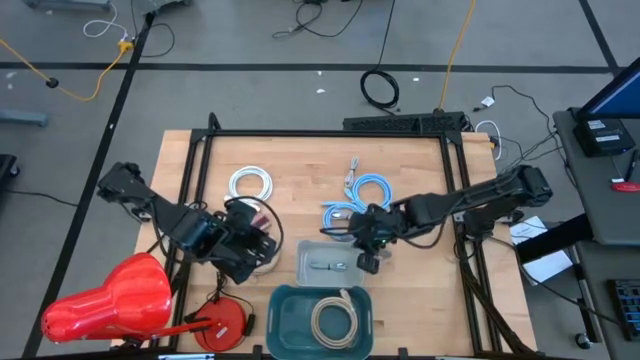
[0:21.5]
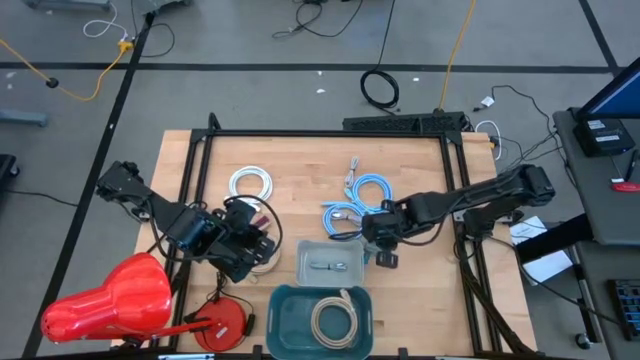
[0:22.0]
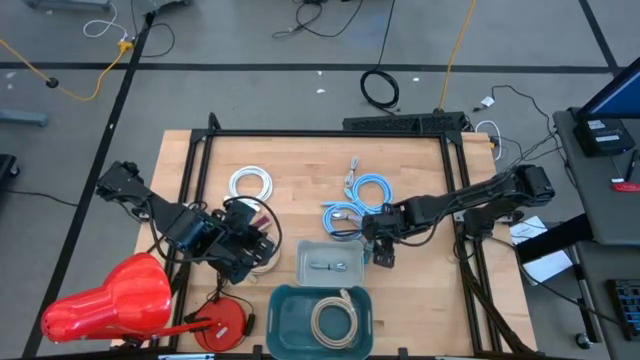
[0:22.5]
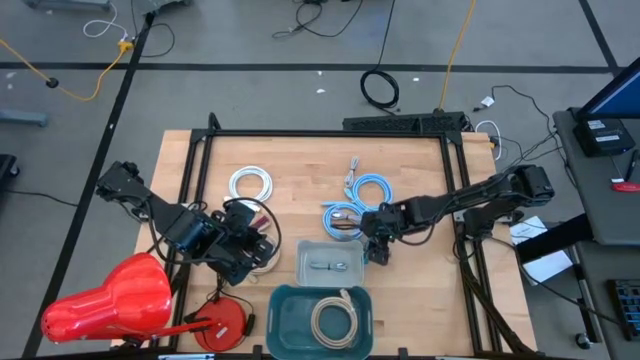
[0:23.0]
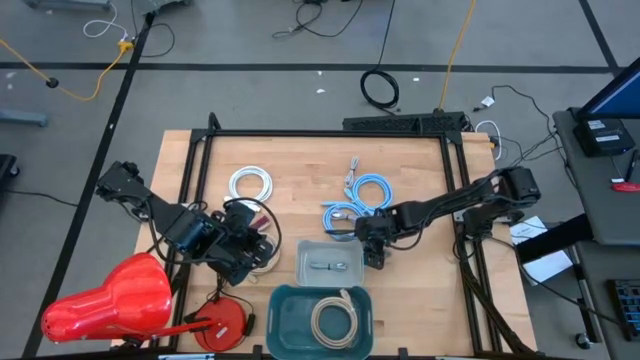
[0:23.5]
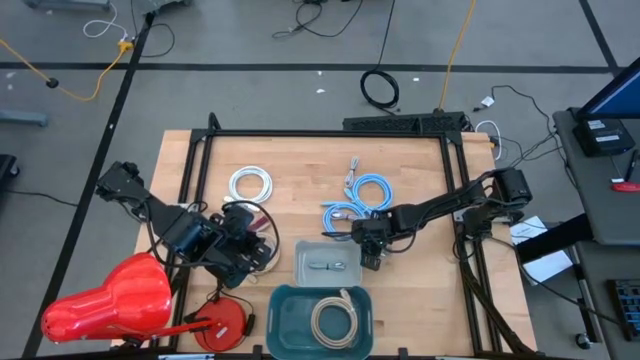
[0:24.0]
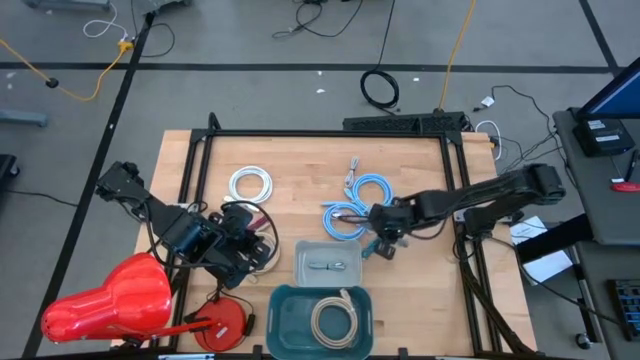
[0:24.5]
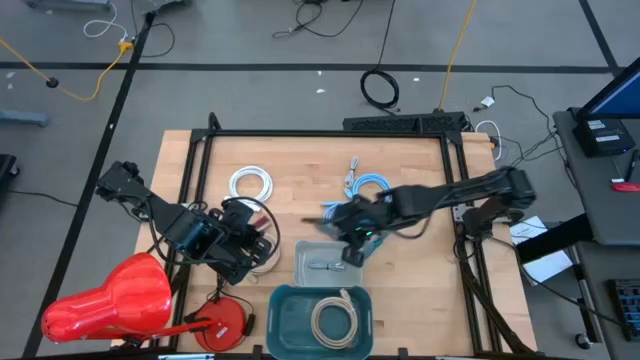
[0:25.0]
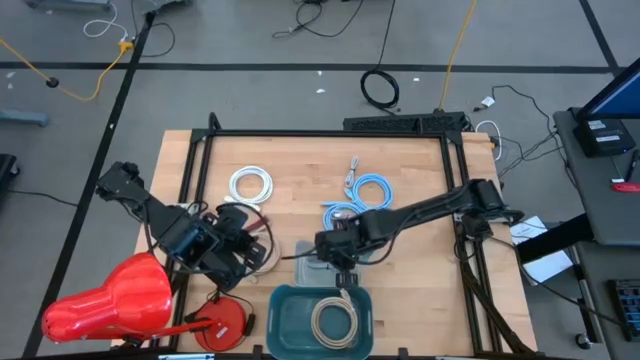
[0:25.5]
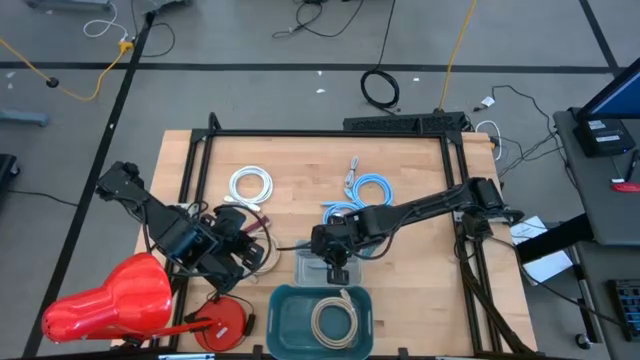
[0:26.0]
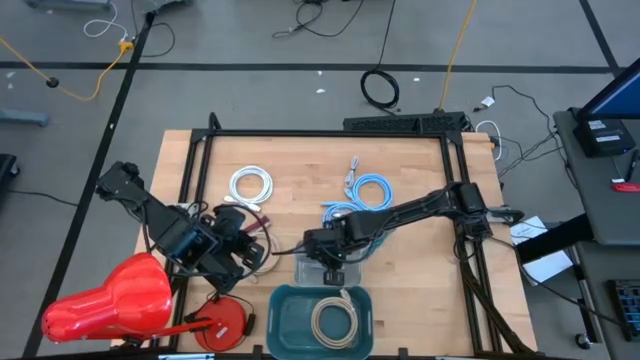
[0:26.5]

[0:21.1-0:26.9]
Task: Pick & Place USB Port
Put the black and white charger cable into the gray bin

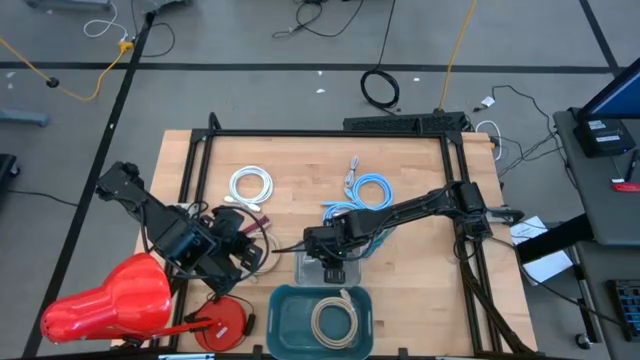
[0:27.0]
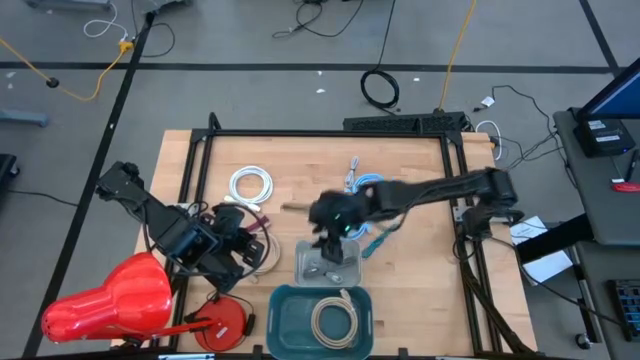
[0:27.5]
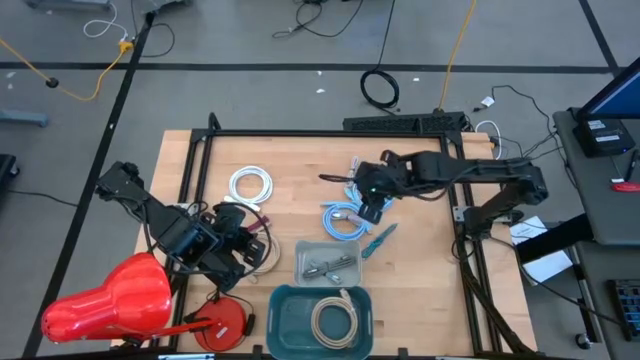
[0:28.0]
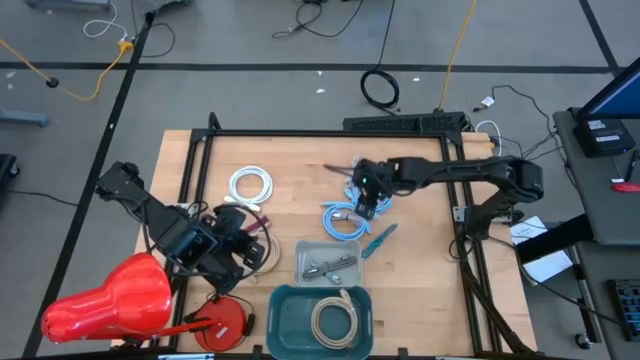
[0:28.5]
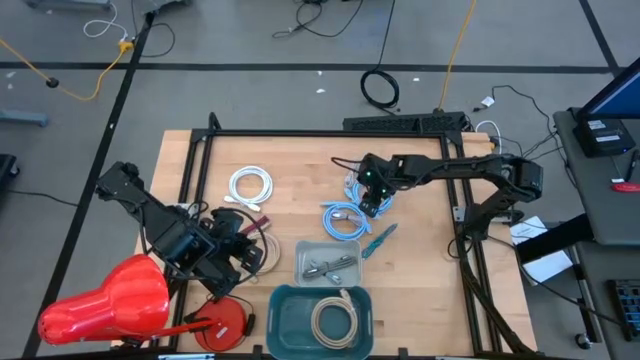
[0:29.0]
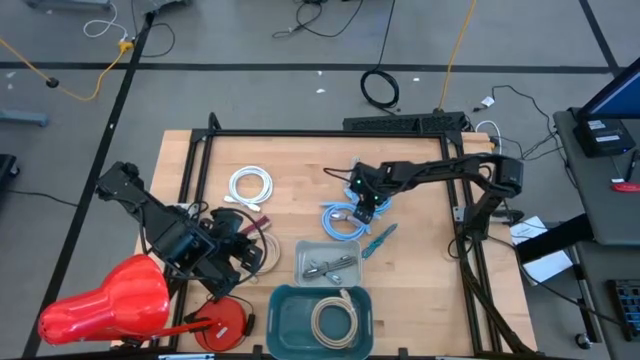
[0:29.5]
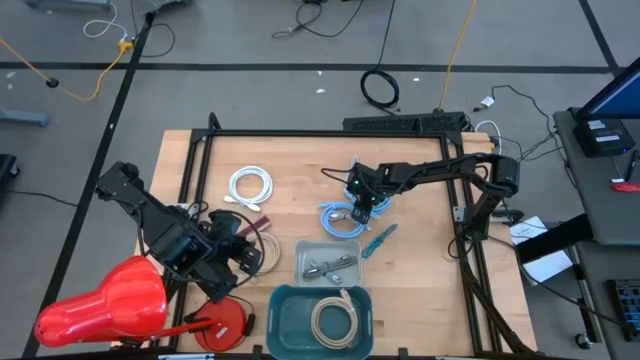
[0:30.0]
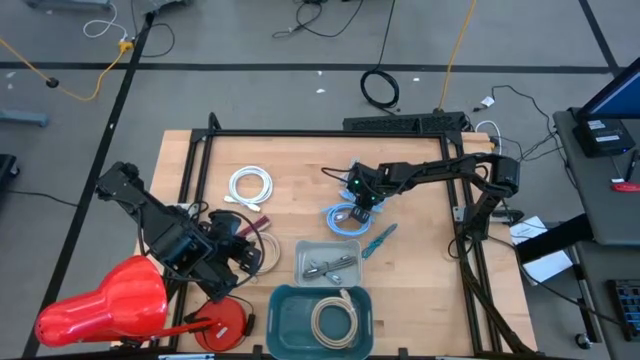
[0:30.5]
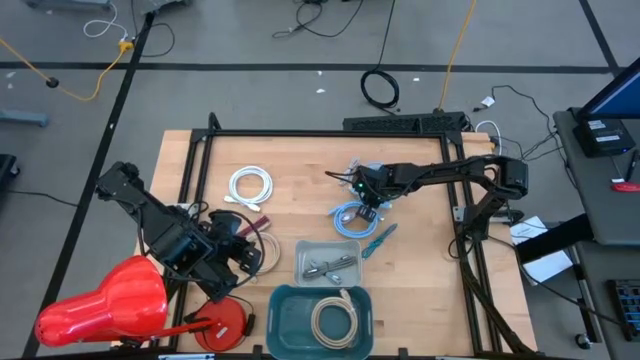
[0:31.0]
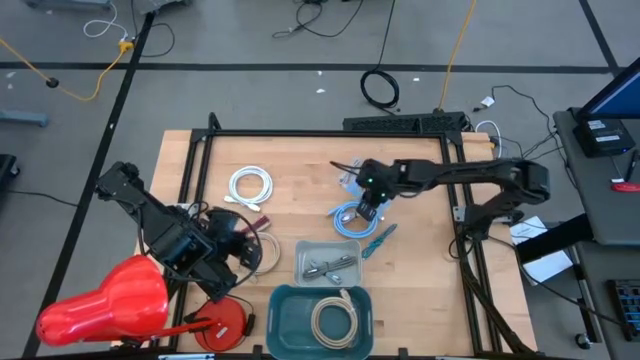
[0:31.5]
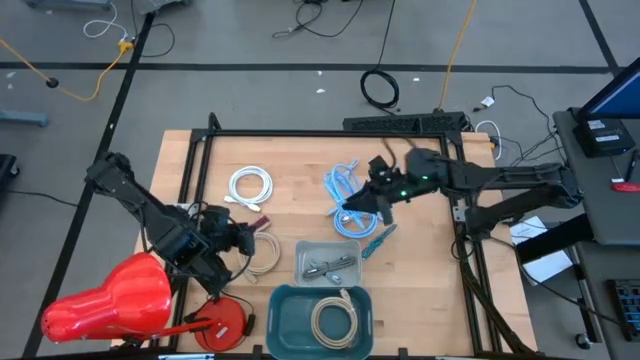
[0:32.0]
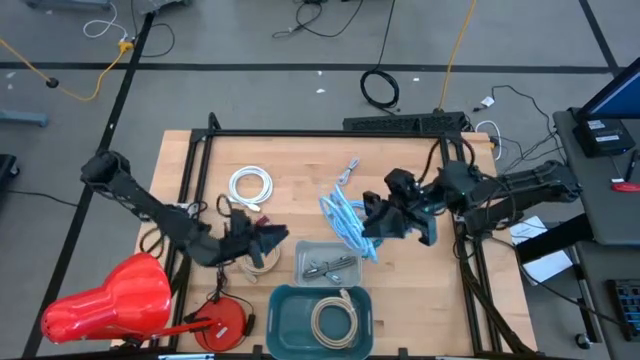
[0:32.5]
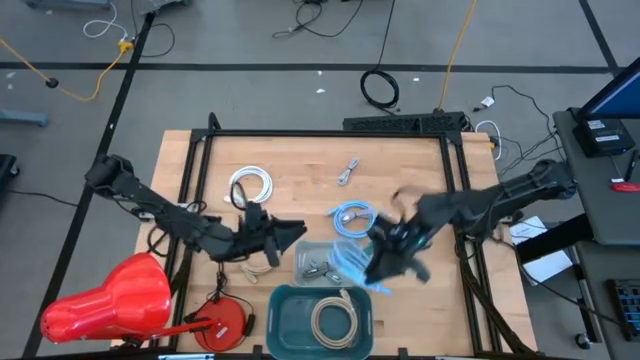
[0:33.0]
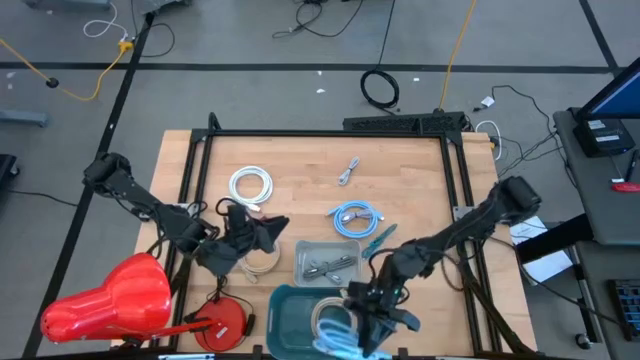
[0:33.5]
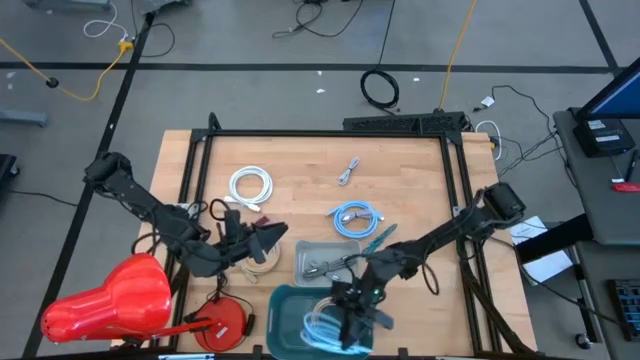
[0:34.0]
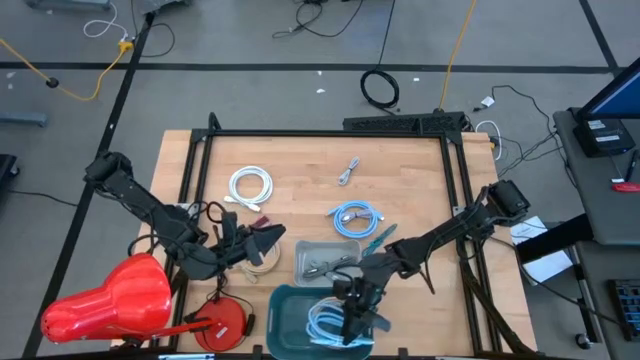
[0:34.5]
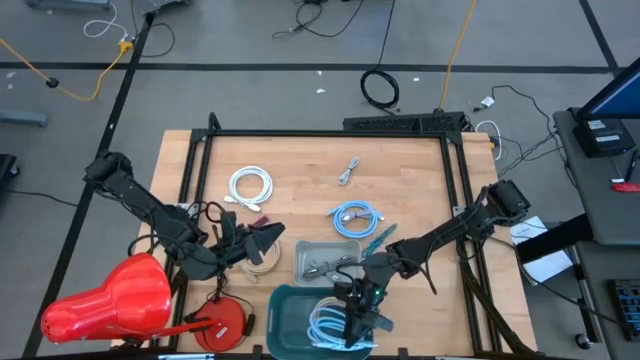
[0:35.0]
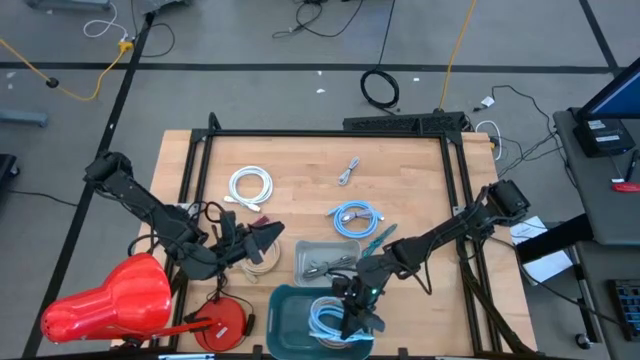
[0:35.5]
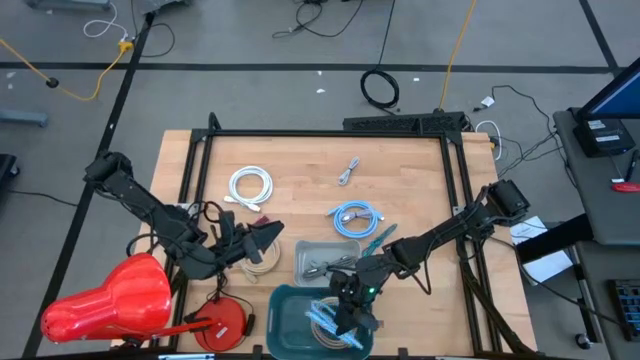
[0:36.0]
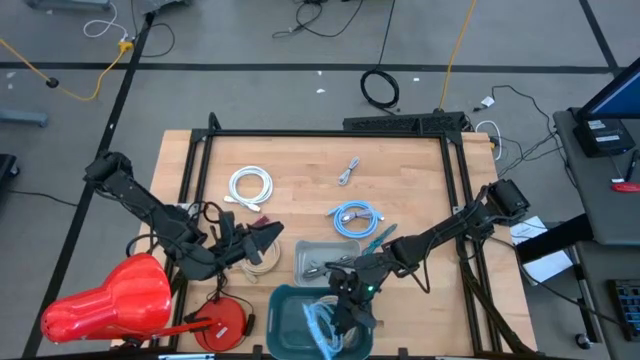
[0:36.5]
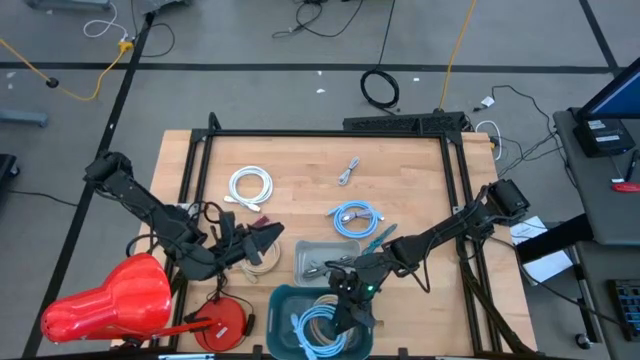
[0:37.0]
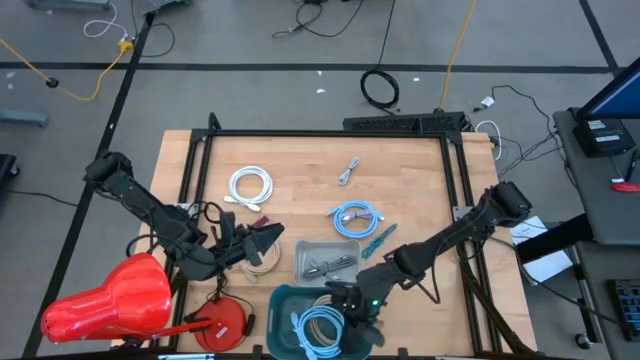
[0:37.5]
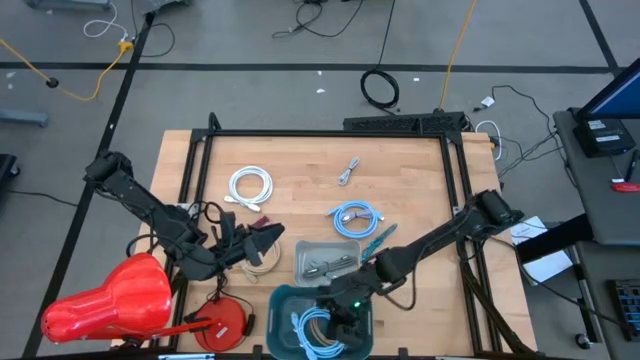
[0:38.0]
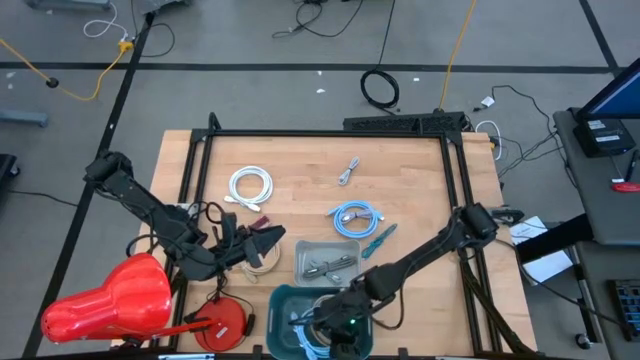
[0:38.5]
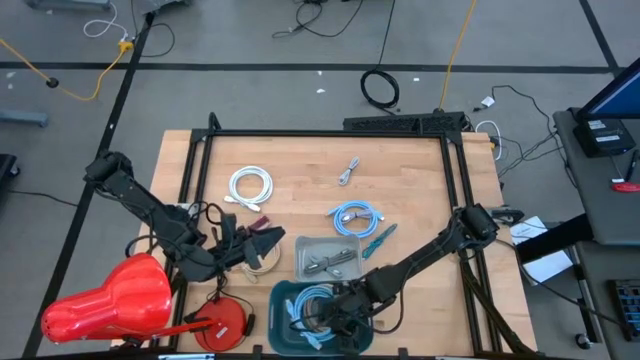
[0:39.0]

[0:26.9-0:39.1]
Put the top blue HDMI cable into the blue bin

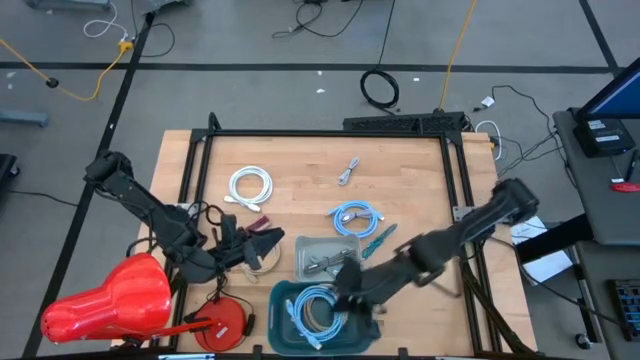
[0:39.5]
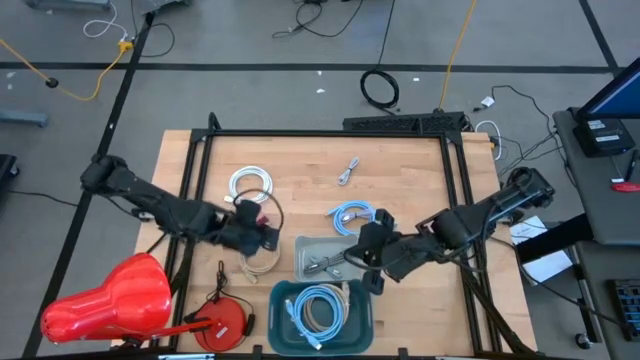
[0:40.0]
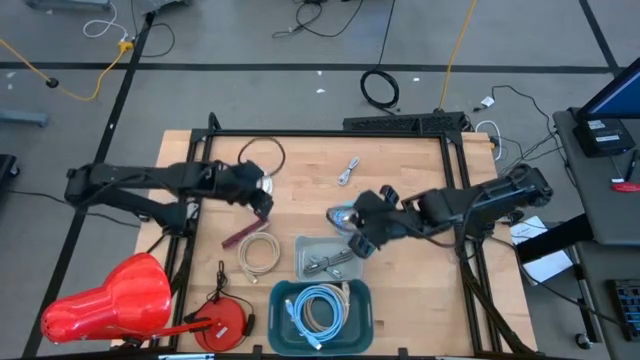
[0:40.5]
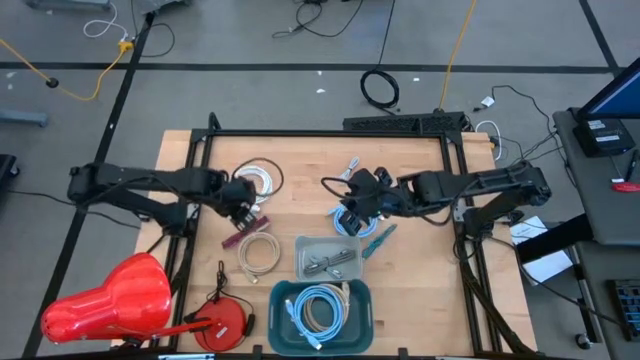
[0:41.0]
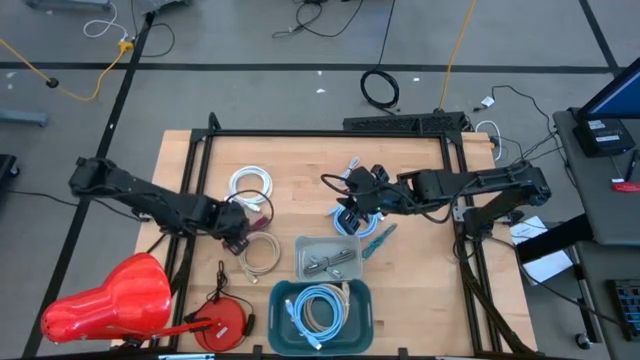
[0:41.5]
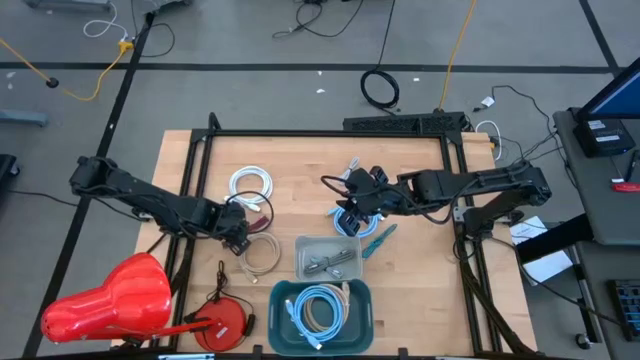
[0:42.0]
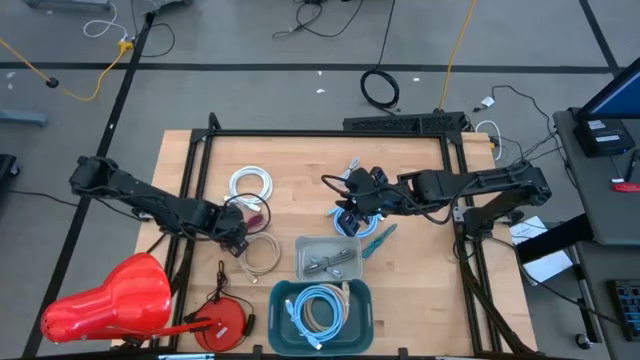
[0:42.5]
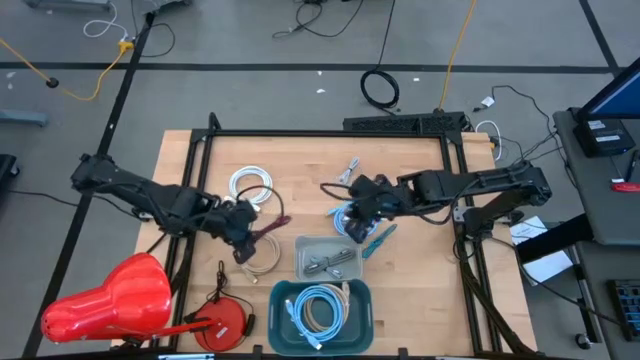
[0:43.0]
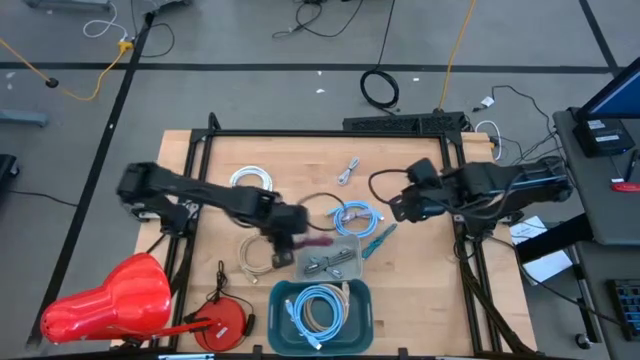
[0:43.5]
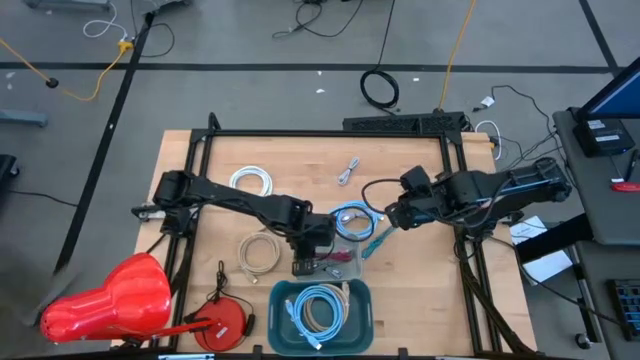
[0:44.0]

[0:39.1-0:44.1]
Put the pink charger cable into the gray bin
